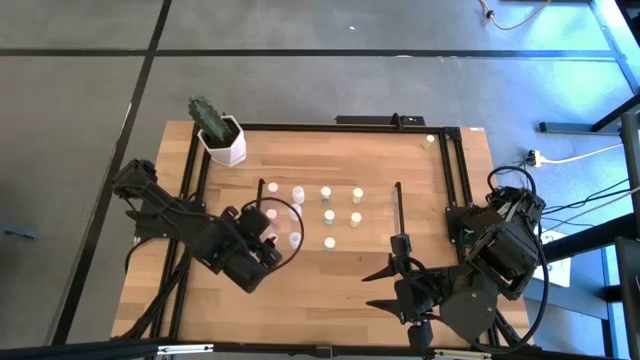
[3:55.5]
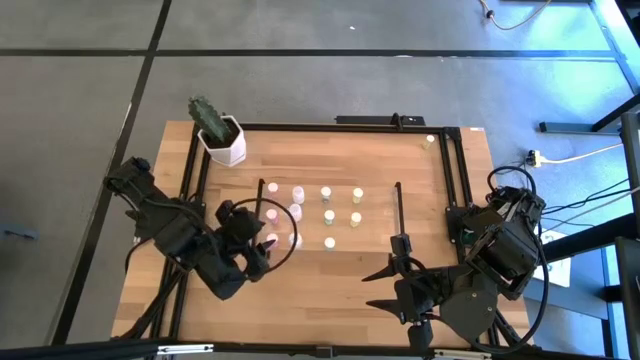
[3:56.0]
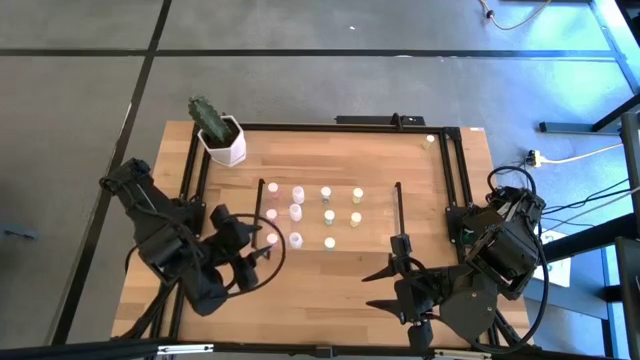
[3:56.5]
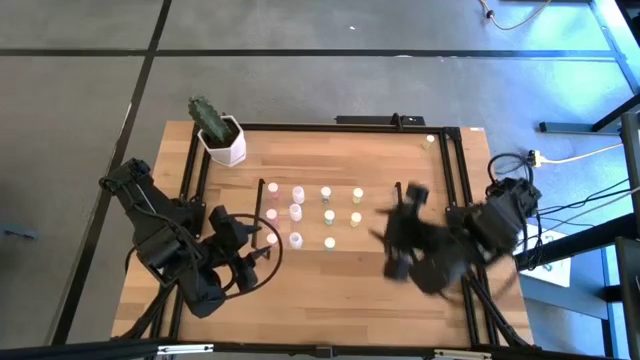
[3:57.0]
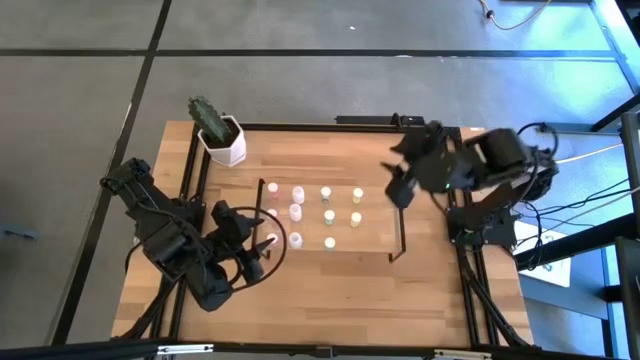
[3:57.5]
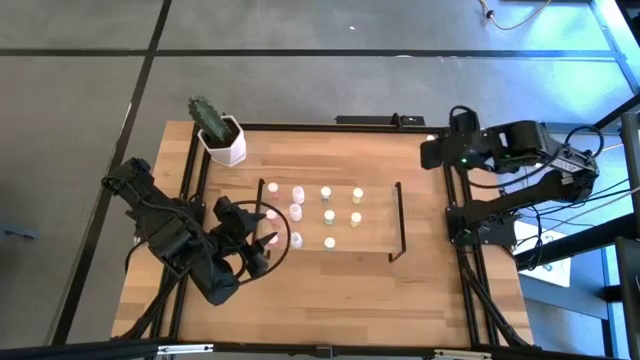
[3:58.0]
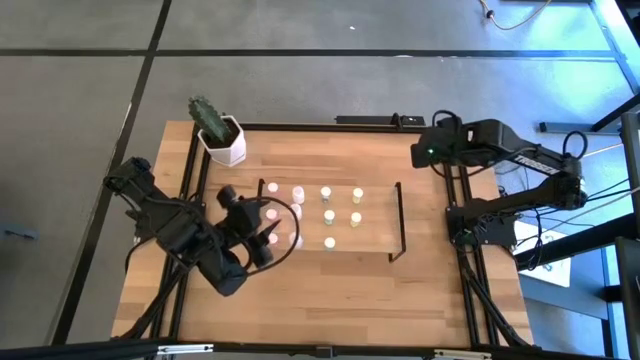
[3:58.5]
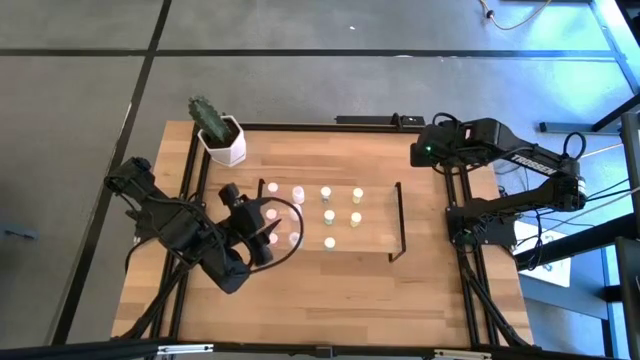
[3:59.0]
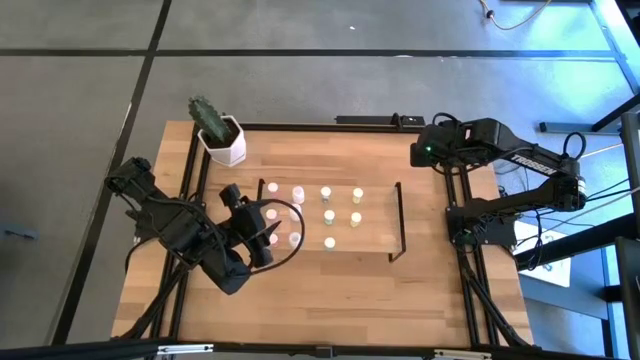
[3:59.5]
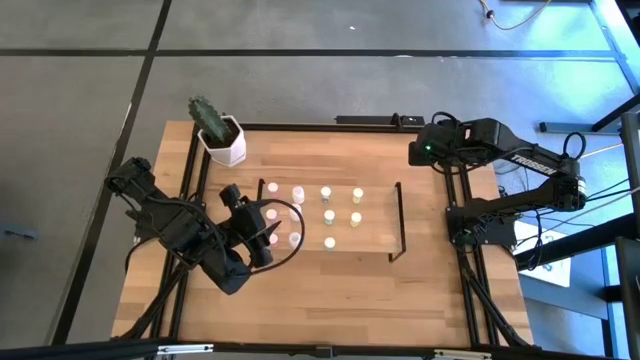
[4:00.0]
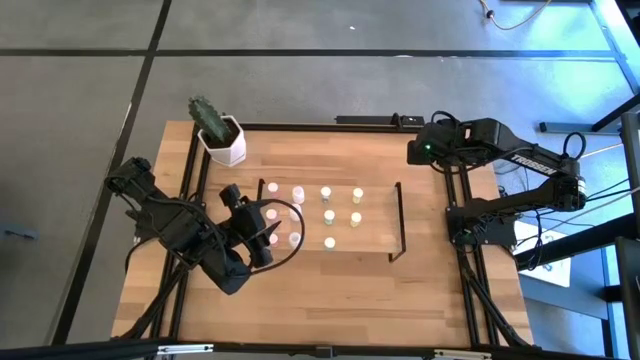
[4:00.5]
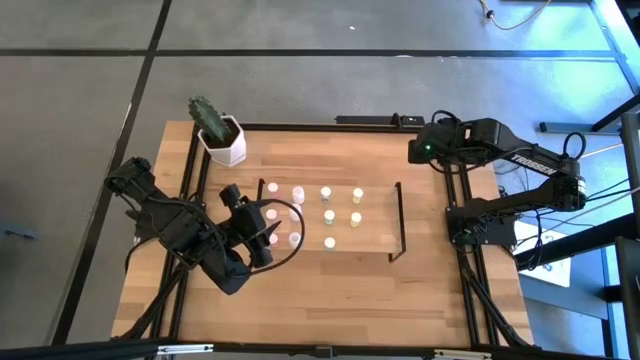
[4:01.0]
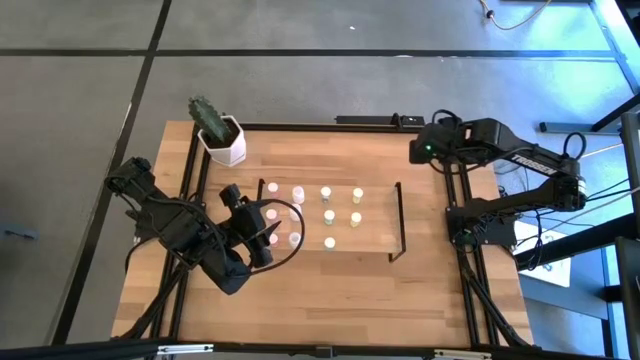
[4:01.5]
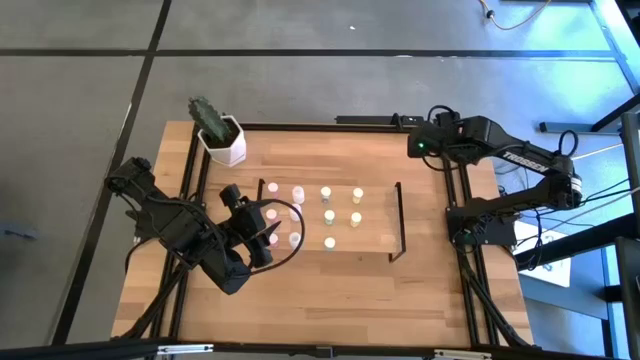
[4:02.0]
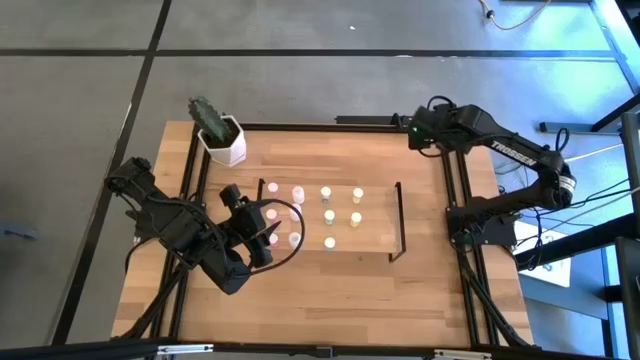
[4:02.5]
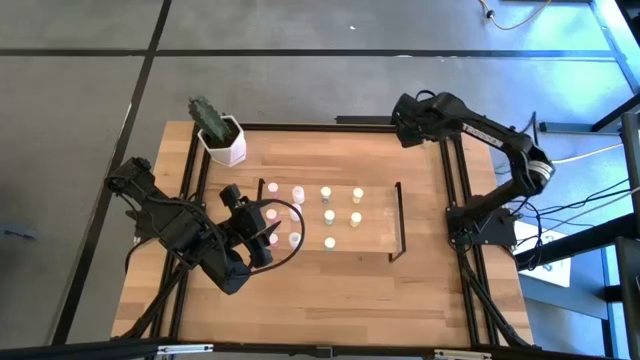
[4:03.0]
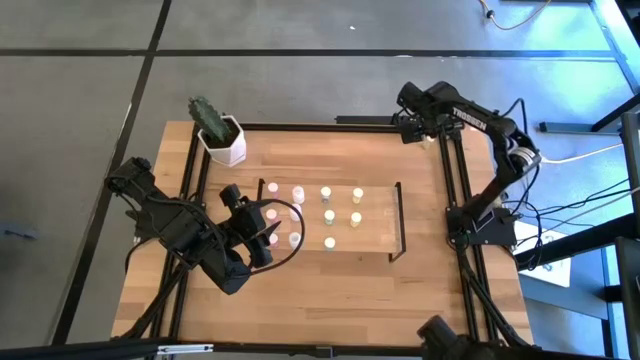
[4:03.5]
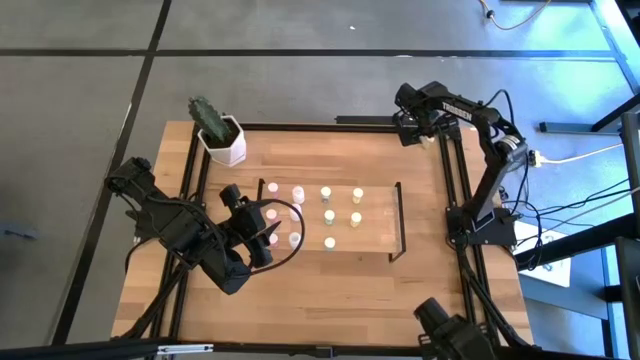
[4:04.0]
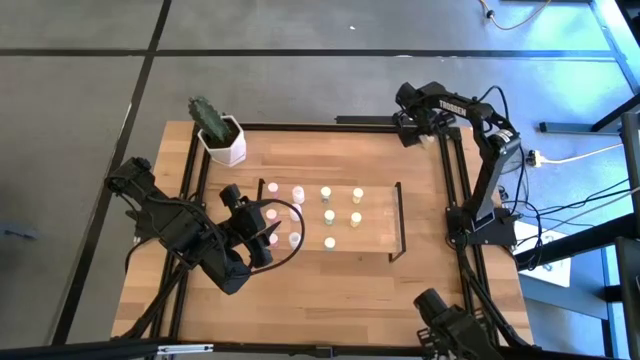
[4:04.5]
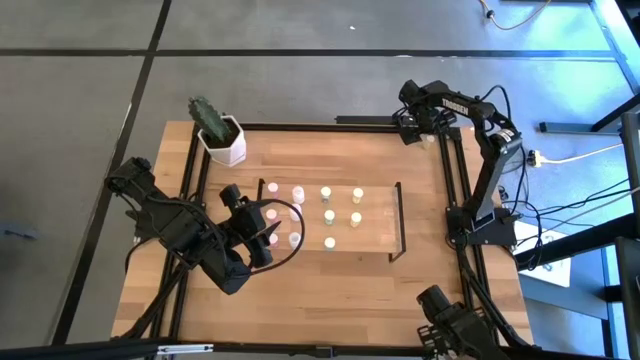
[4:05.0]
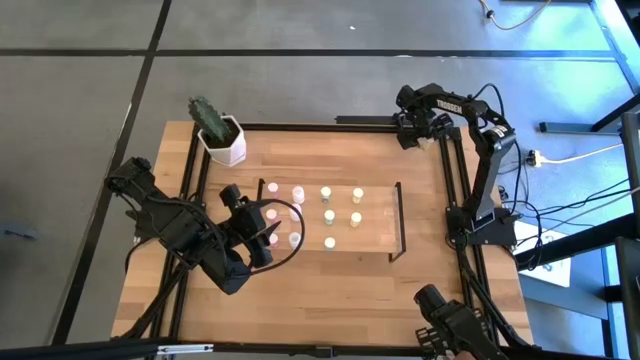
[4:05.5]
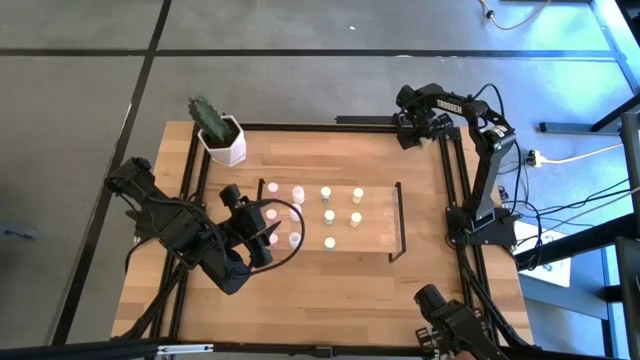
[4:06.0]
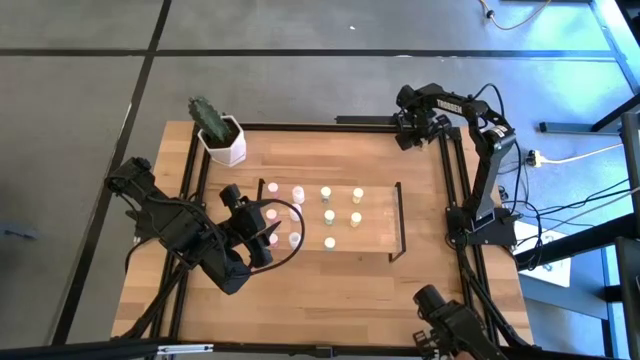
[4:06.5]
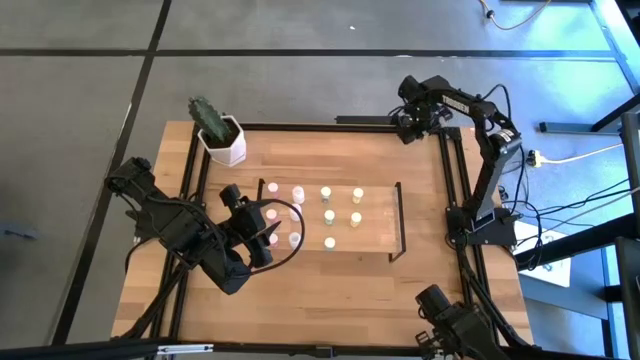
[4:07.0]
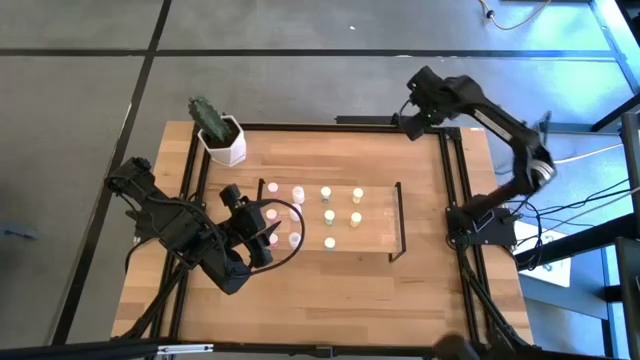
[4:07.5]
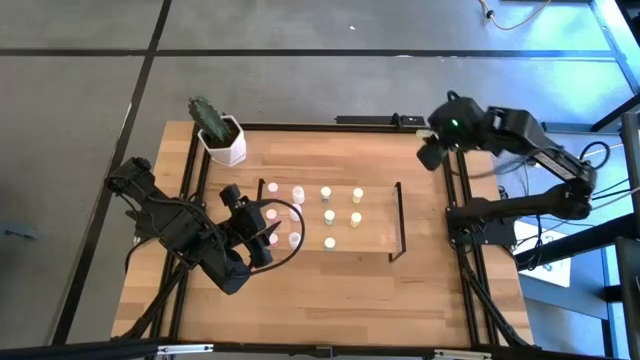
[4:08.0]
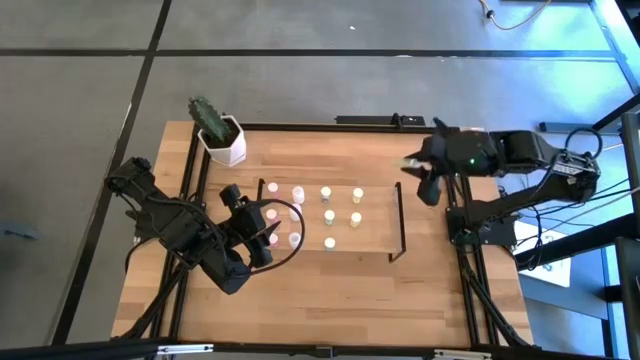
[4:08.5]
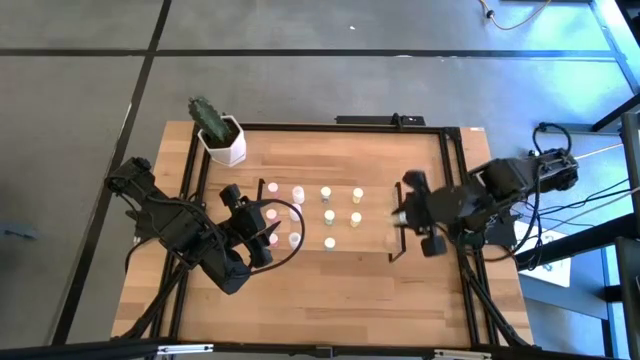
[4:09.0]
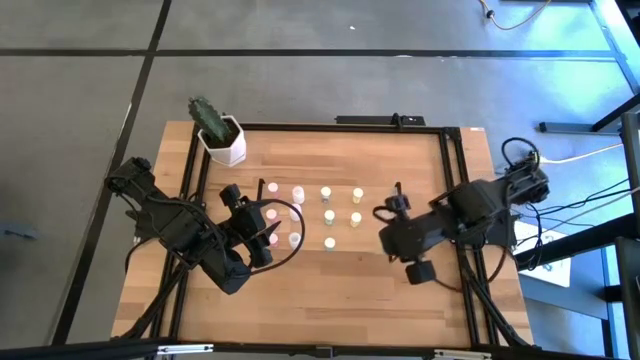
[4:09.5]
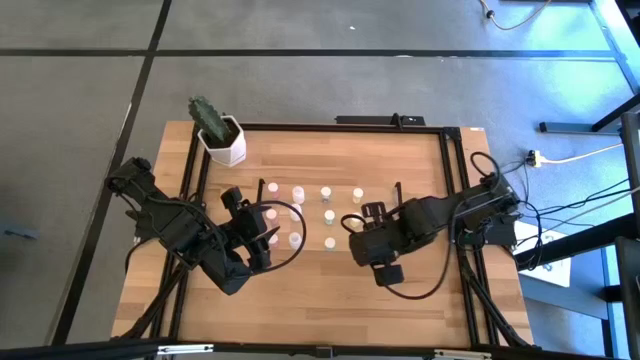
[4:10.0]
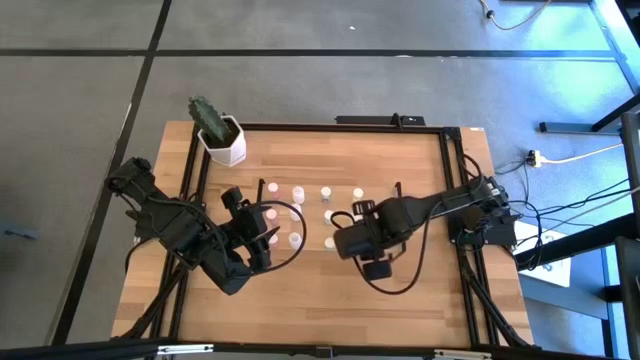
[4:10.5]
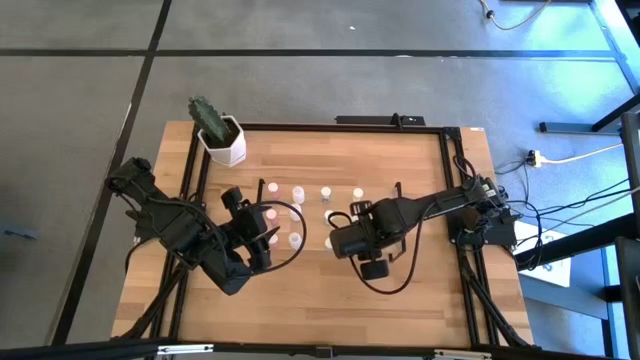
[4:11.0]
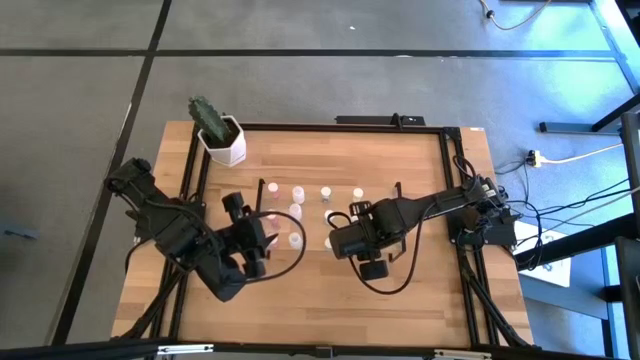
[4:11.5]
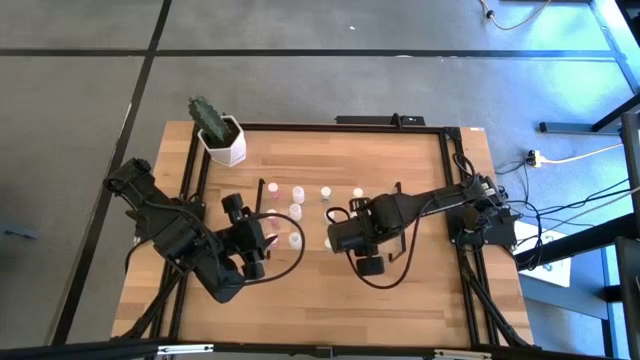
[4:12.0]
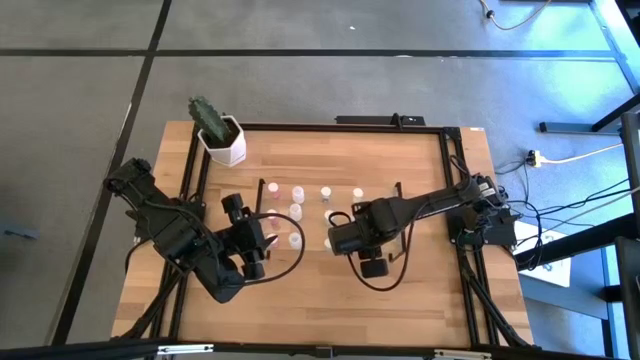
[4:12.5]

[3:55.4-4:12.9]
Task: Pick and place medicine bottles onto shelf by color
Put the yellow pill bottle on the shelf aligned with the other yellow pill bottles

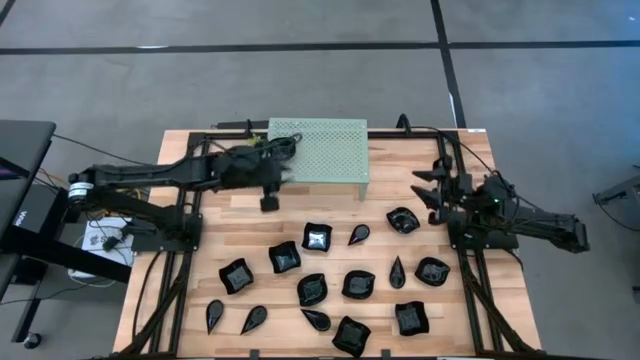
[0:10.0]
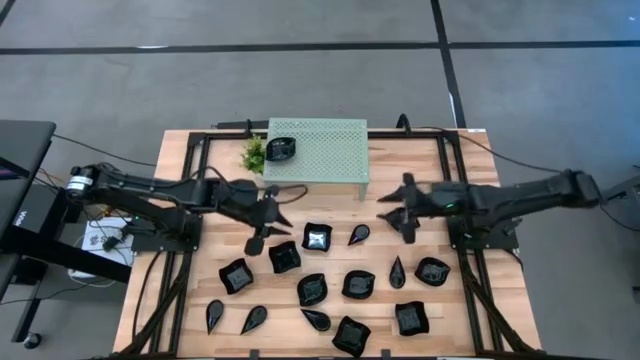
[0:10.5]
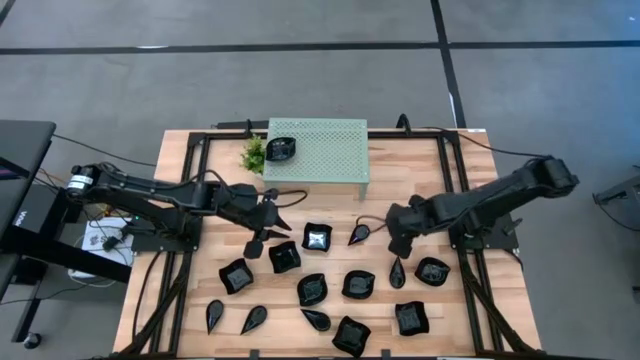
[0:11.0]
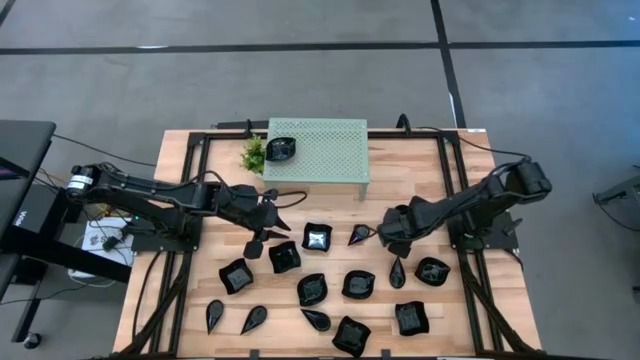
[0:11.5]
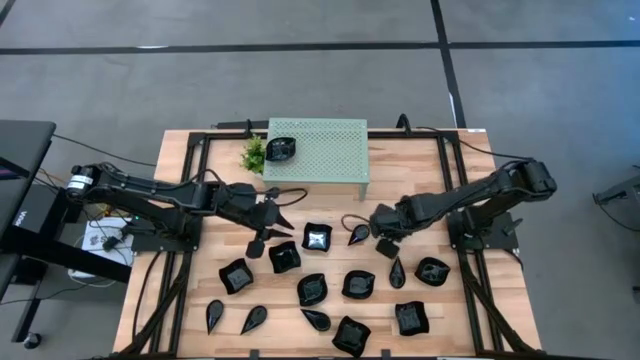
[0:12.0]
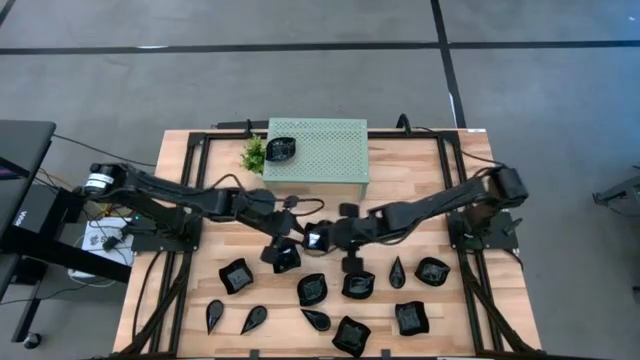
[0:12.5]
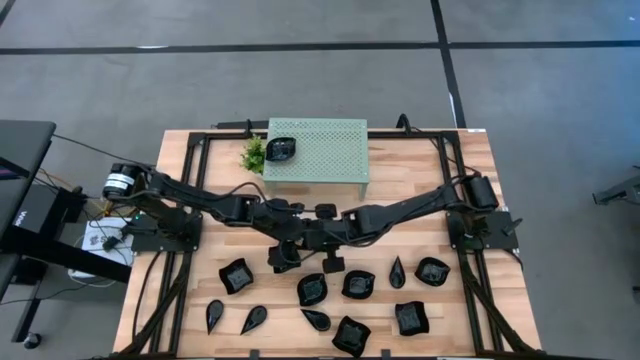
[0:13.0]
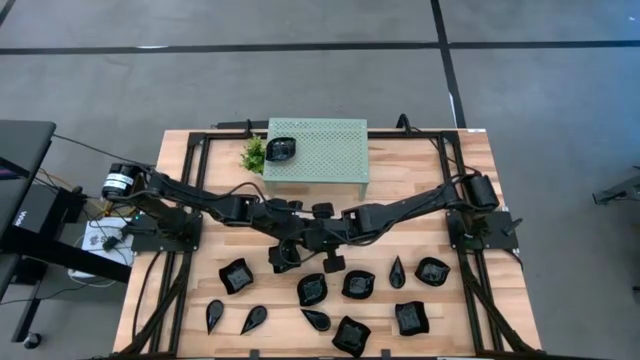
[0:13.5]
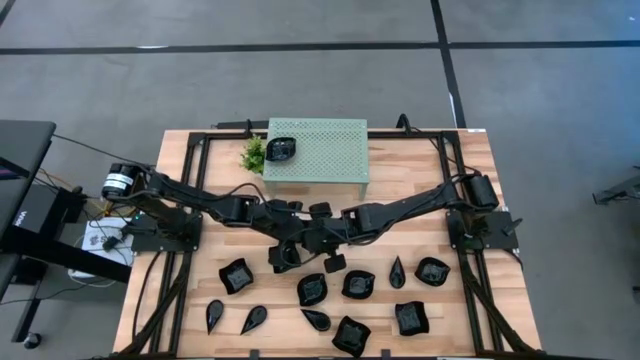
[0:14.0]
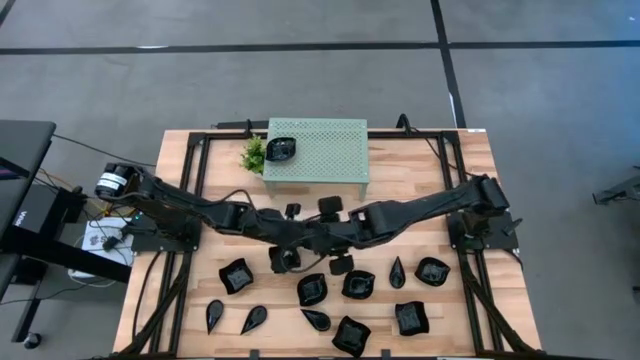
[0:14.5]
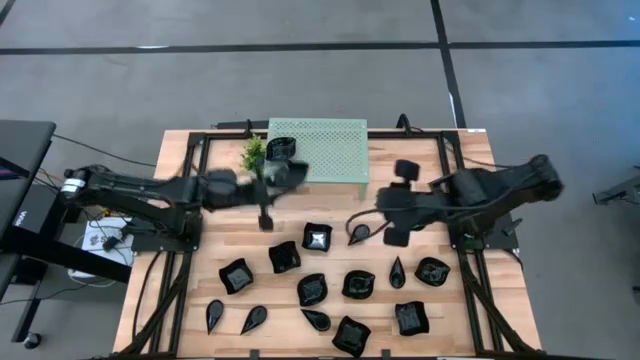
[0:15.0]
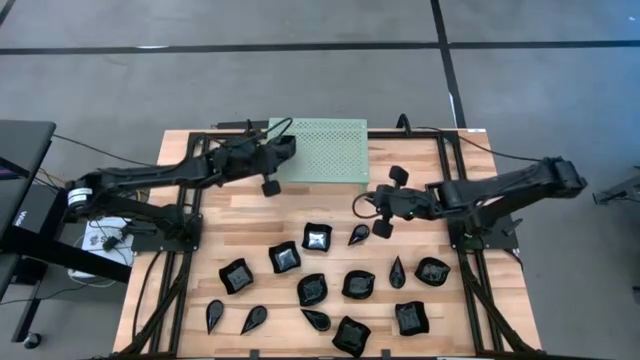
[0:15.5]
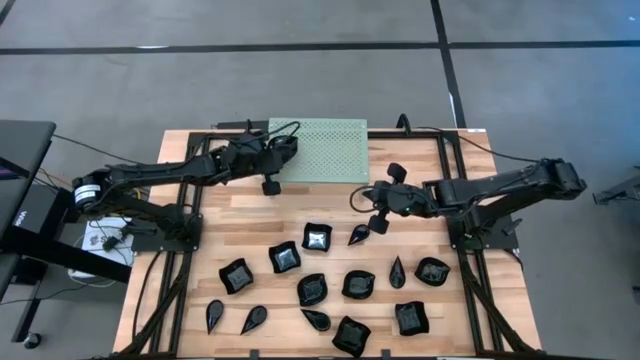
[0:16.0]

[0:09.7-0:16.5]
Task: Pick & Place Mini shaped plates
Stack the leaf-shaped plate on top of the other leaf-shaped plate on the shelf
